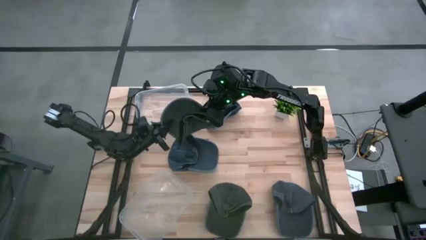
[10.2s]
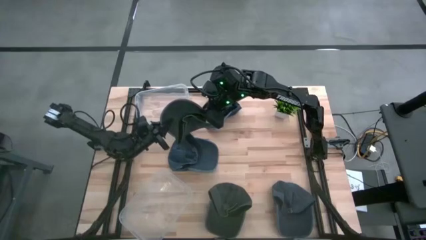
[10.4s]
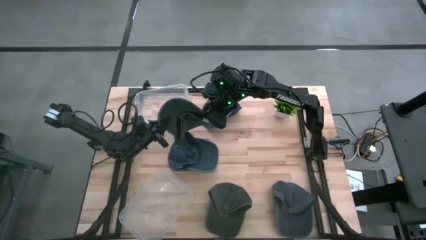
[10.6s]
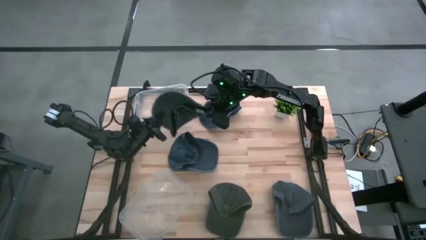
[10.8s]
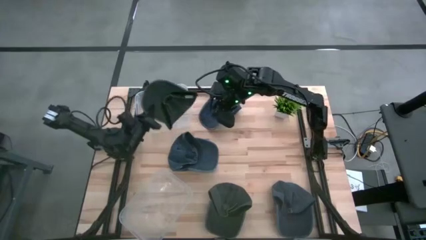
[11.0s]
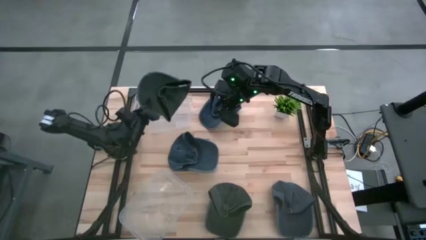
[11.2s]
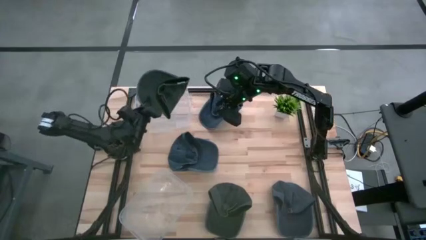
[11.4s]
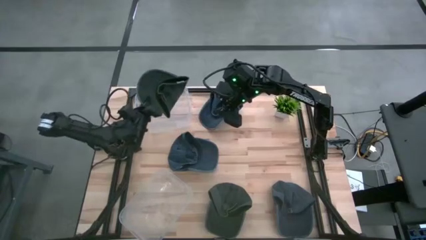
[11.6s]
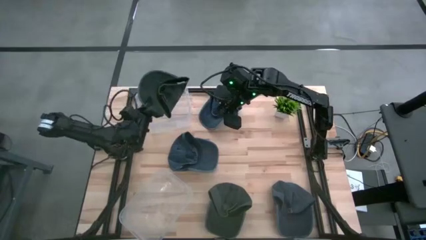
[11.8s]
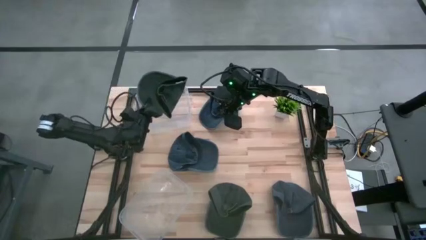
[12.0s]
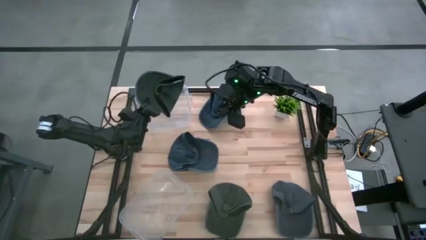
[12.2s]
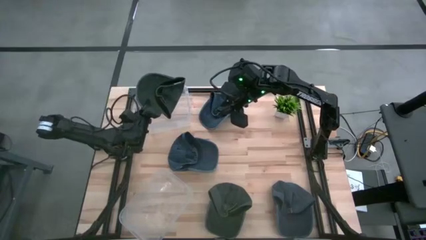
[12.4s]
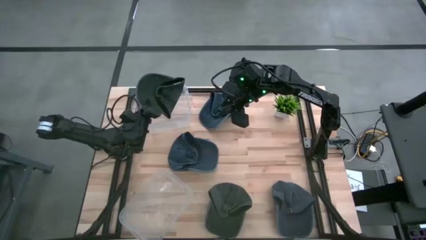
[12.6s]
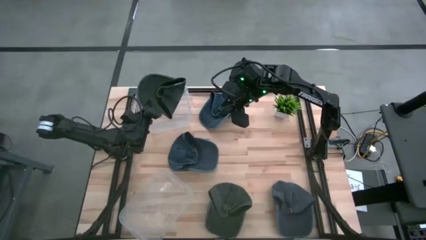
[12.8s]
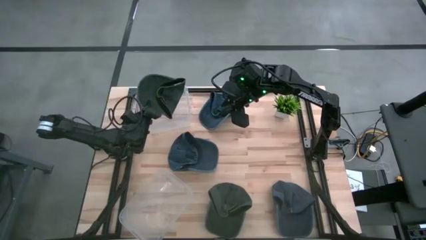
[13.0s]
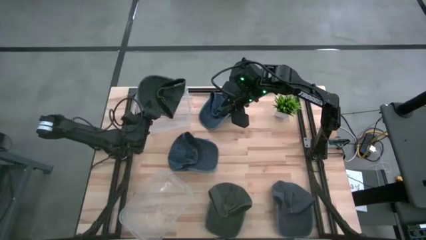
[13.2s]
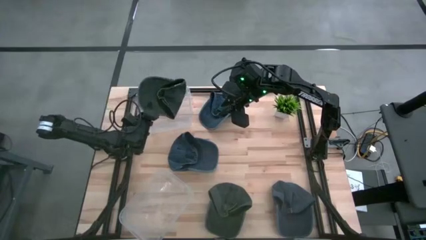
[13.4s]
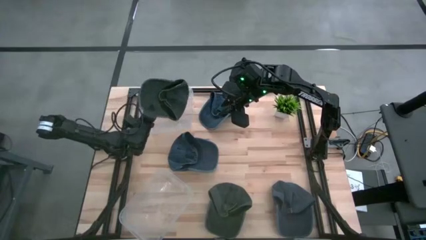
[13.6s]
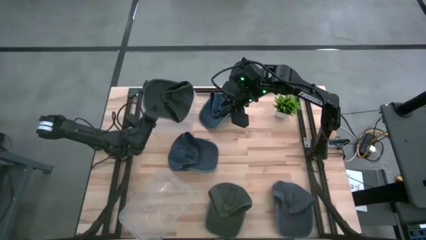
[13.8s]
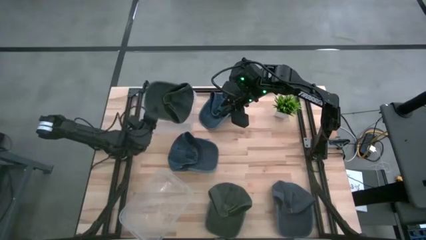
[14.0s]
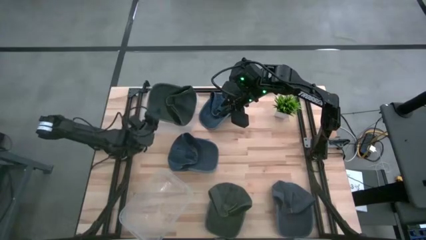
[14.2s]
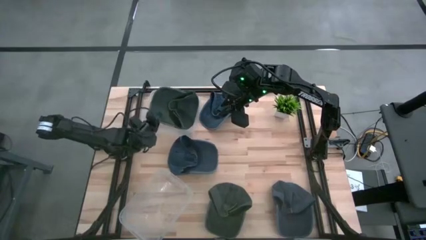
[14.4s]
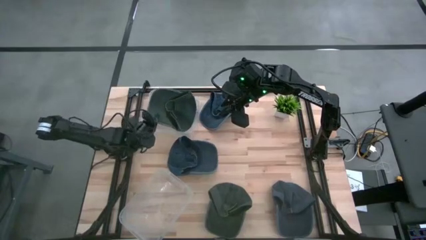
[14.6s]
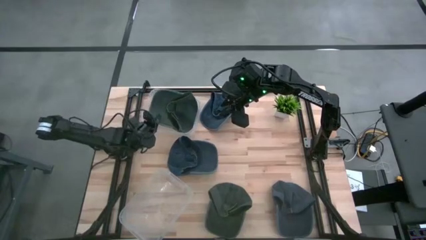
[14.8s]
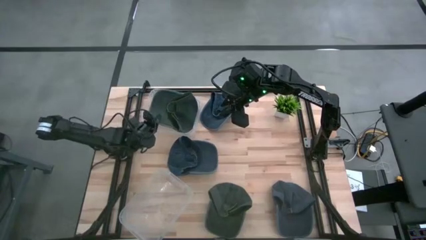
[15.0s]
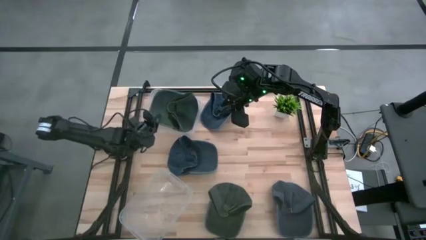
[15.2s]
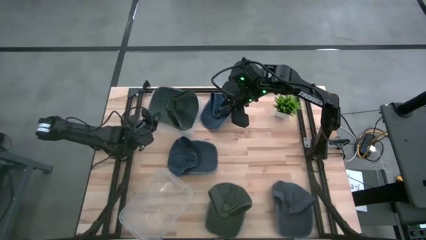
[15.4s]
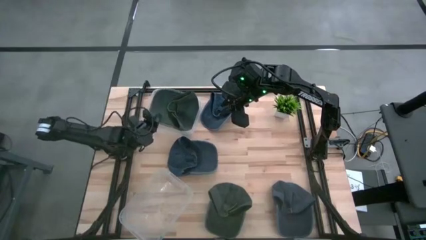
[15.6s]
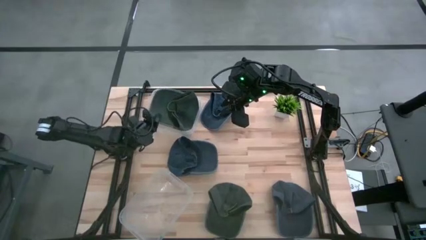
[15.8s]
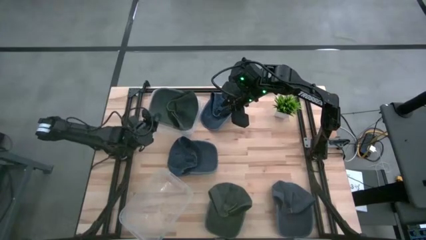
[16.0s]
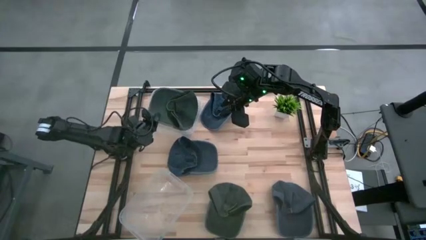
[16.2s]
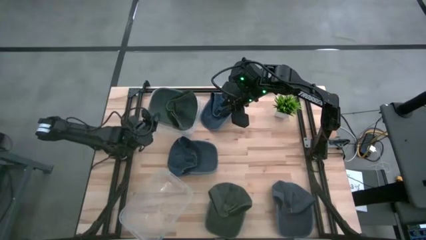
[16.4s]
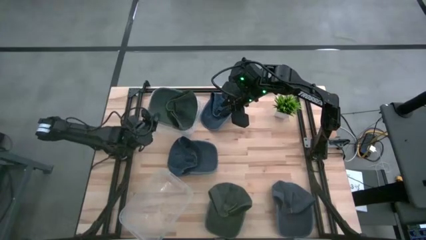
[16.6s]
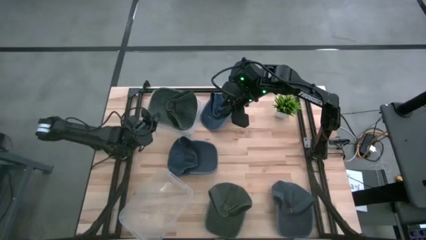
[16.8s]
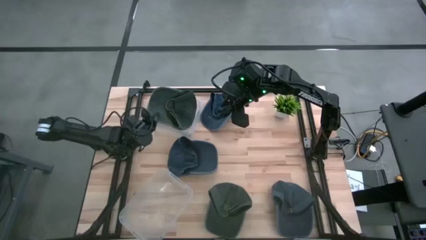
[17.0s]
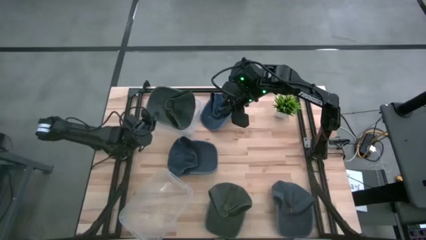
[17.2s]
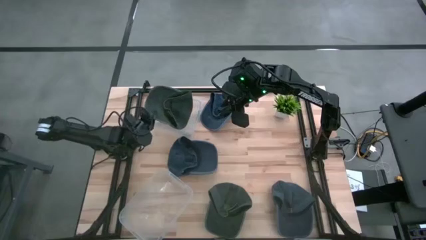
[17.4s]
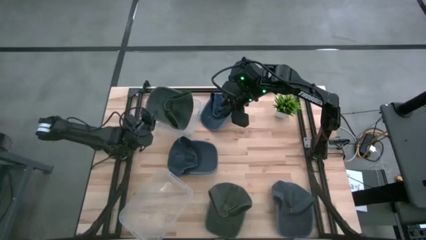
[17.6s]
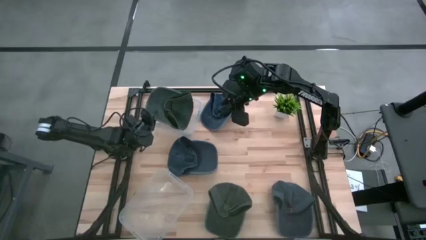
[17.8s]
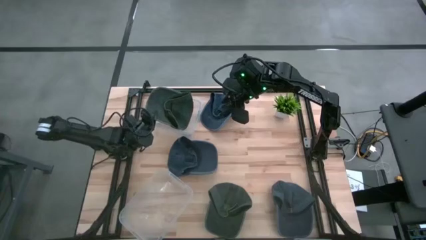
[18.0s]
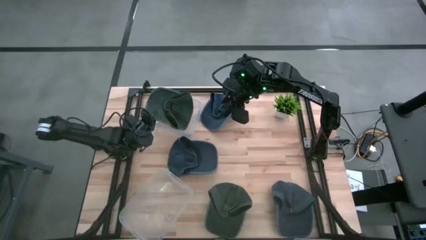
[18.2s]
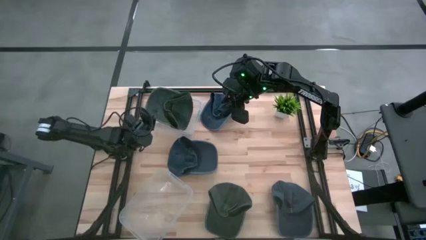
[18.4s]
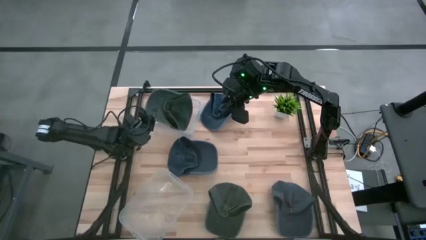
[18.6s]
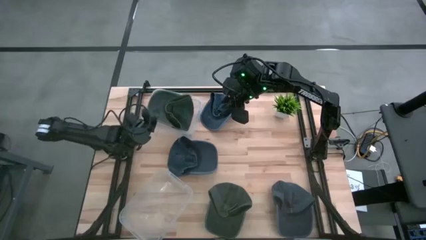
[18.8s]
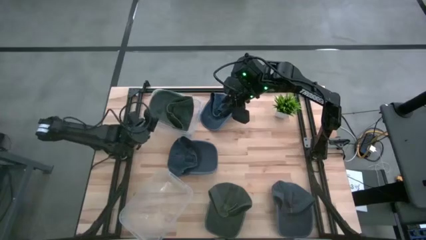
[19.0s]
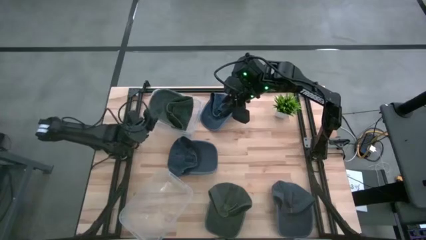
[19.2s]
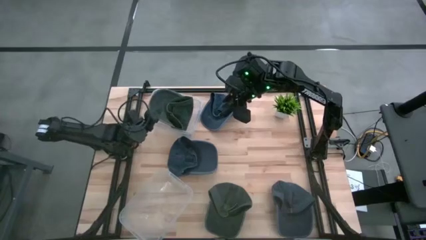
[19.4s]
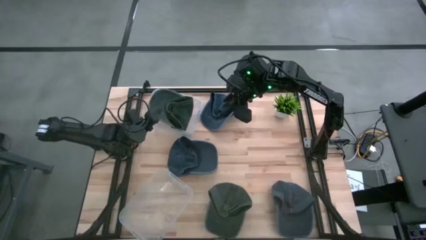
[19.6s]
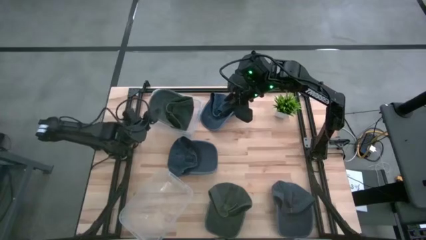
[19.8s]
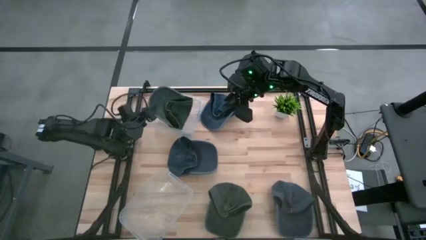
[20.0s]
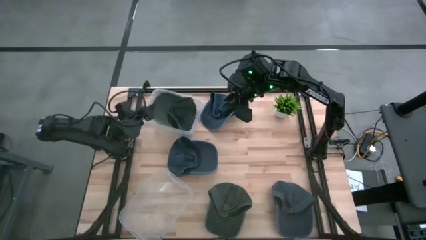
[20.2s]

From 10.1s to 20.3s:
Task: Pick & Place hat
Put the top gray cap into the top transparent bin
